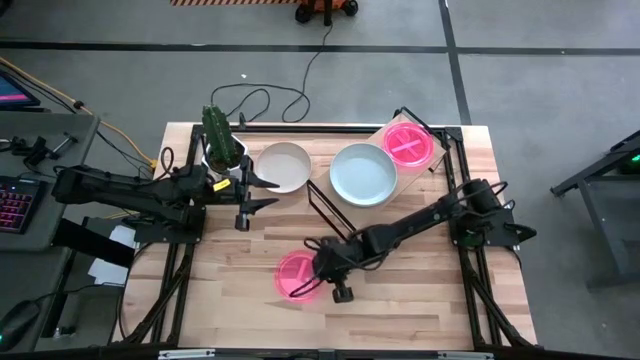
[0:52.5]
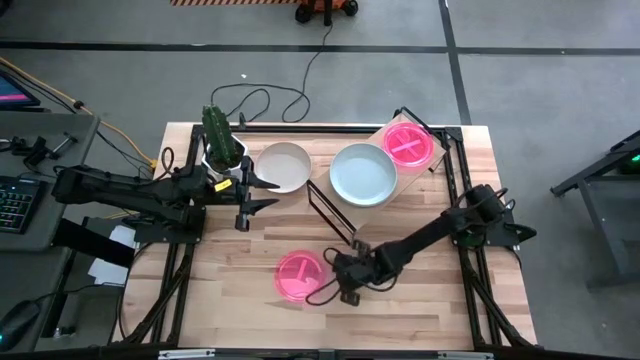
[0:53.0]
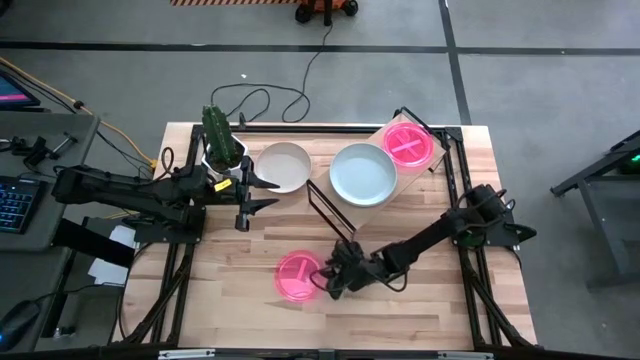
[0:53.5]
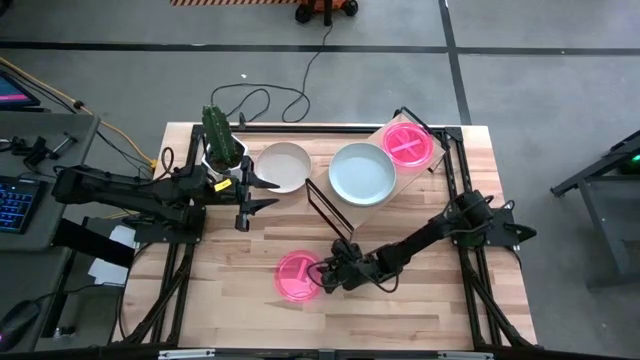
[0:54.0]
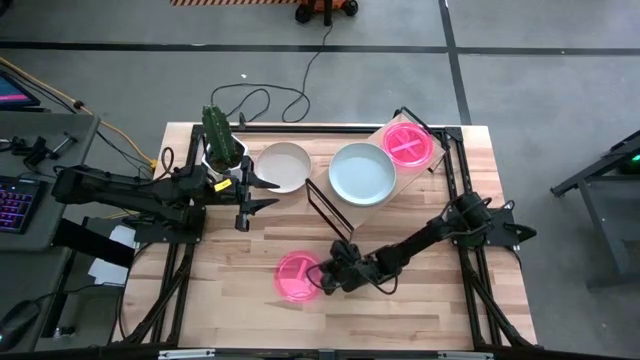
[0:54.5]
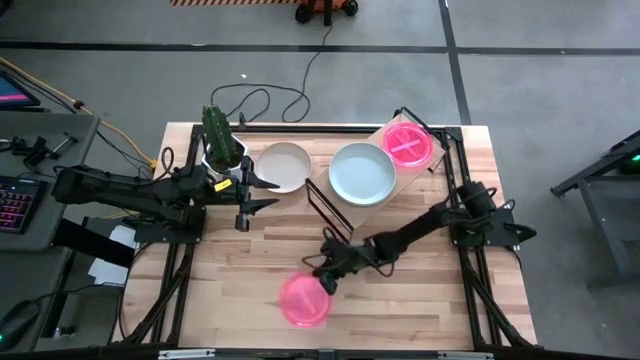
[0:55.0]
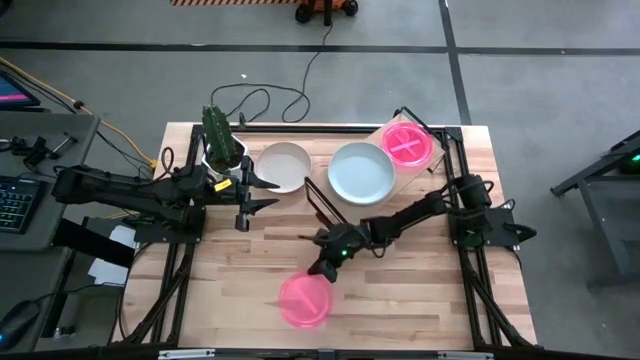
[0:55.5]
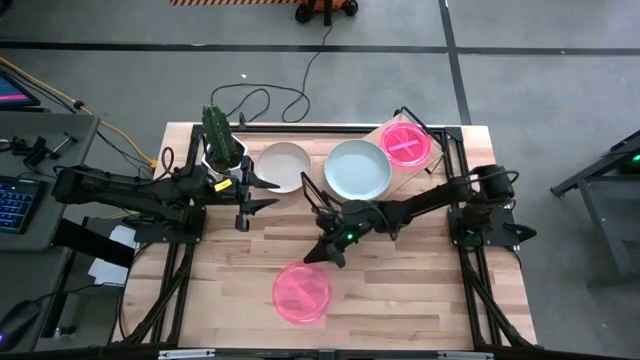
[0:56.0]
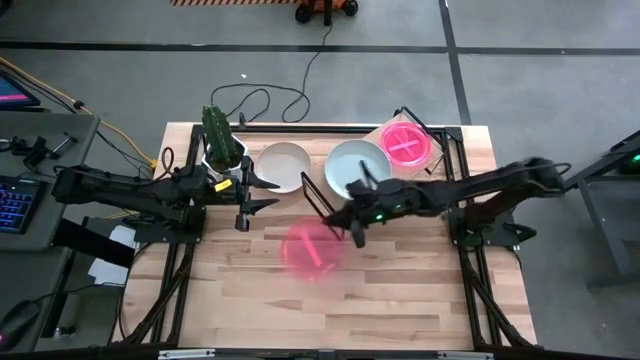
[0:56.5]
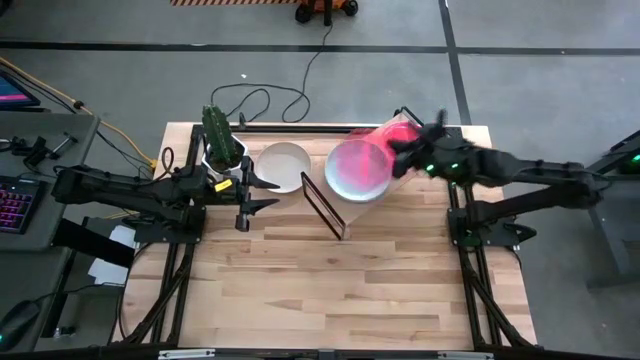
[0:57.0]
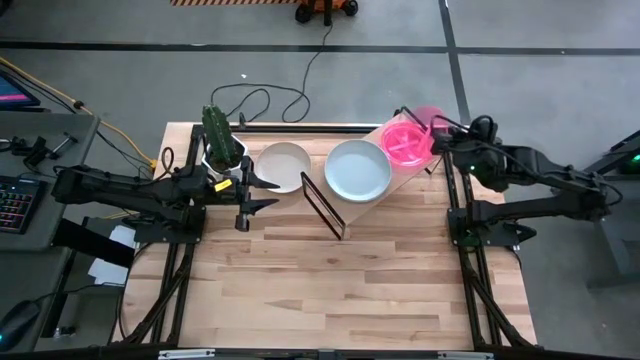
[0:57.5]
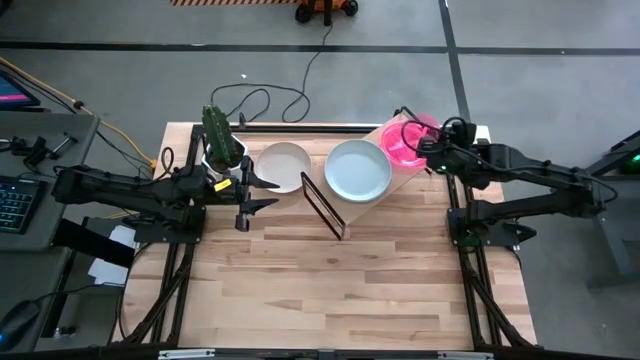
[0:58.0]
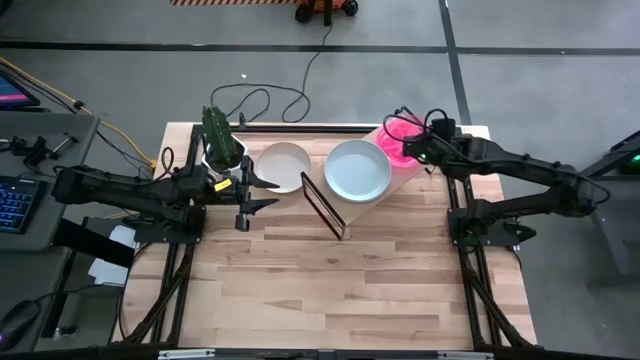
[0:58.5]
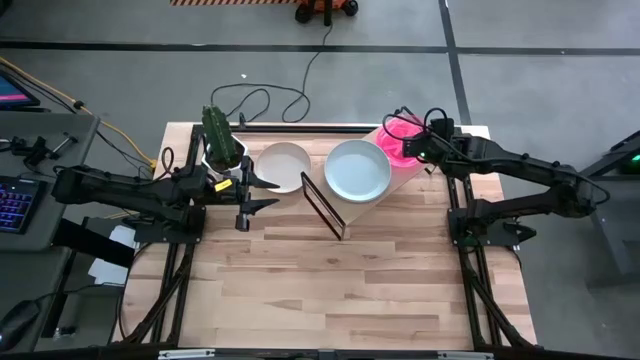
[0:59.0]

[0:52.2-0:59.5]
Task: Place and stack plates onto a shelf
Stack the pink plate on top of the pink plate on the shelf

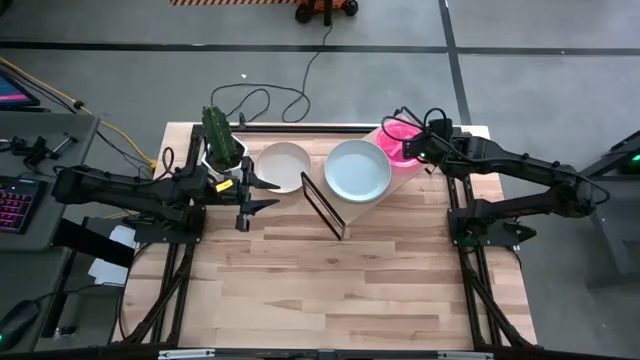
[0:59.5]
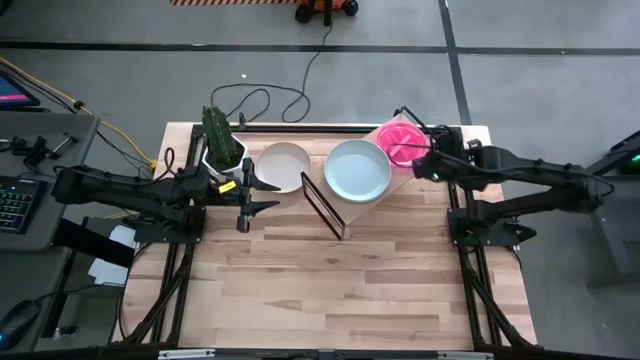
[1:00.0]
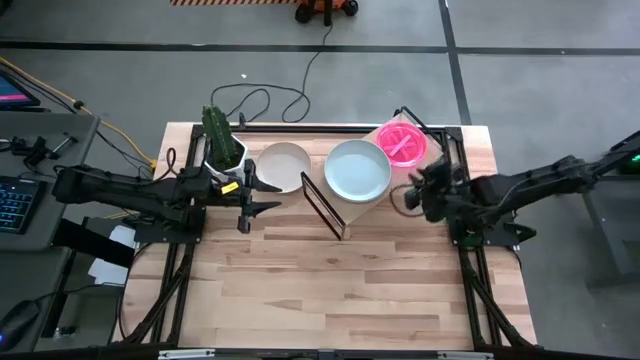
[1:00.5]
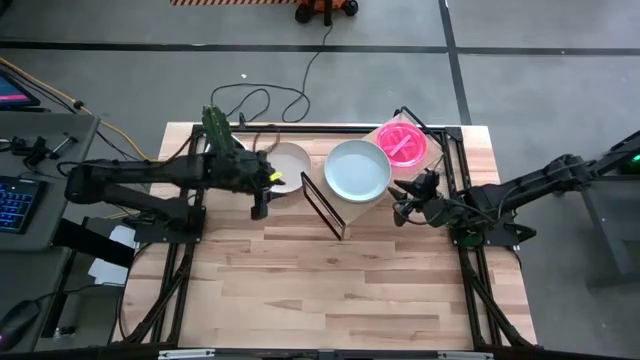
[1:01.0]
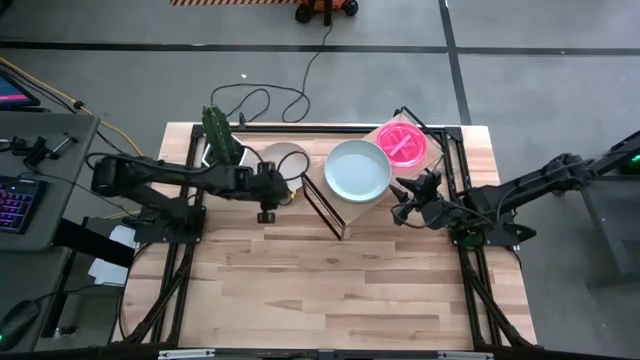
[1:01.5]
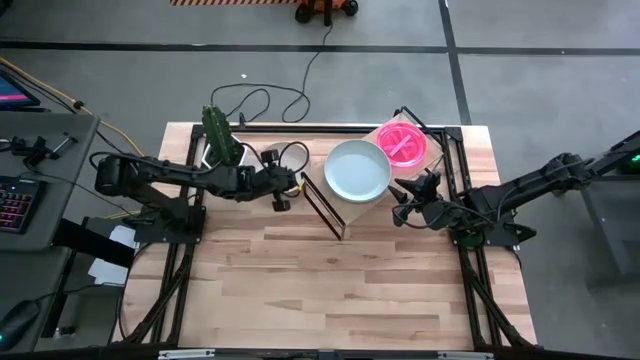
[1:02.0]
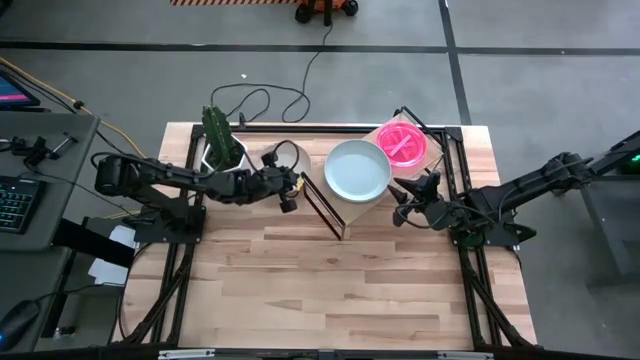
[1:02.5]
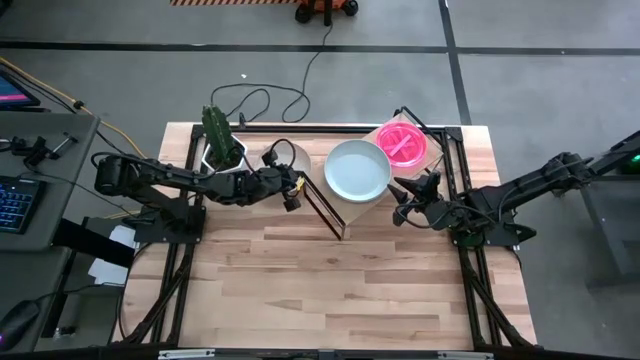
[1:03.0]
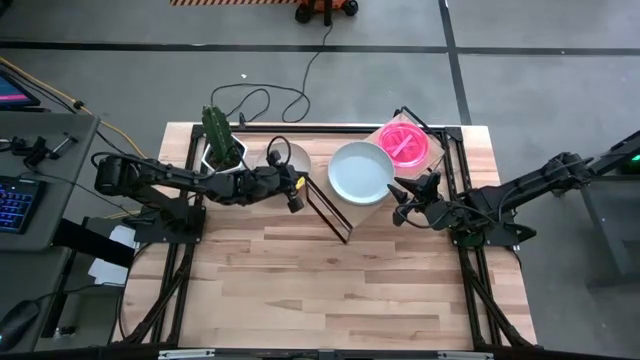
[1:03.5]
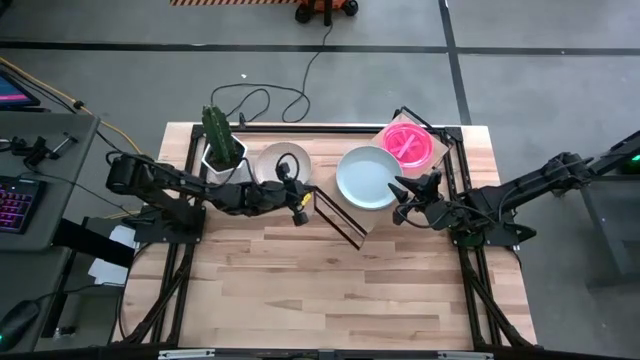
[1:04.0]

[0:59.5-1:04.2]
Adjust the shelf

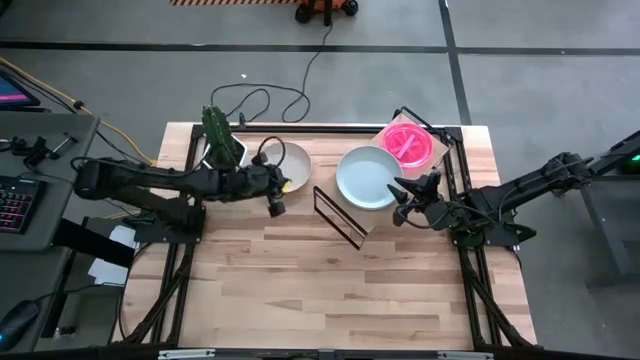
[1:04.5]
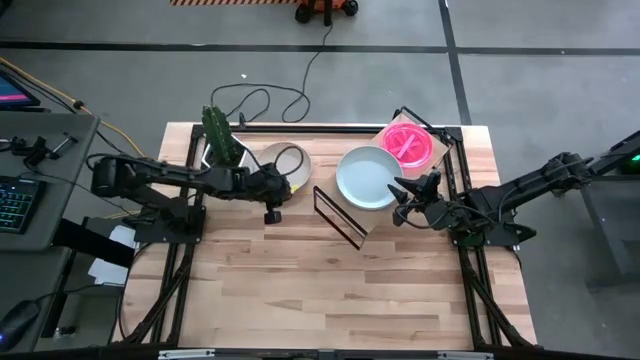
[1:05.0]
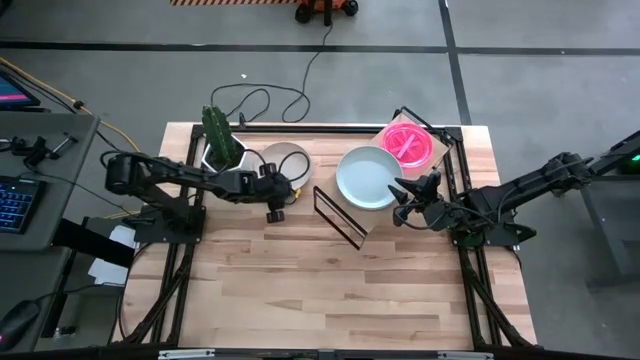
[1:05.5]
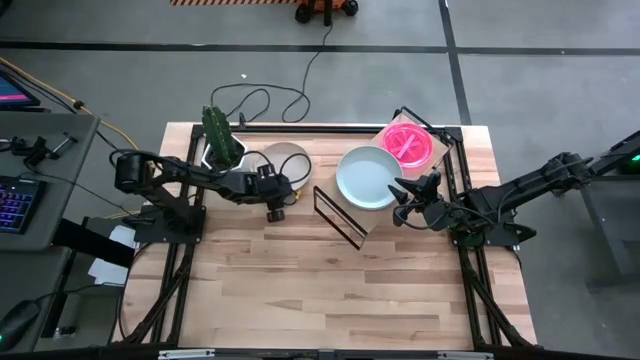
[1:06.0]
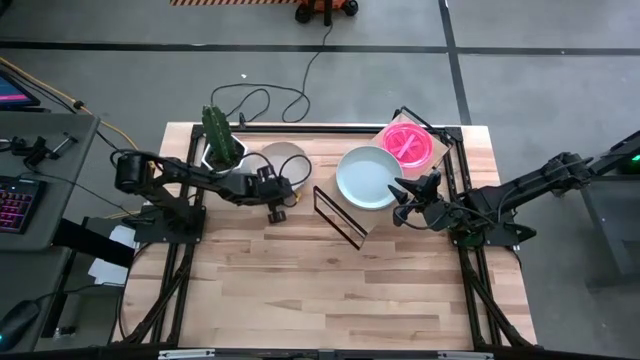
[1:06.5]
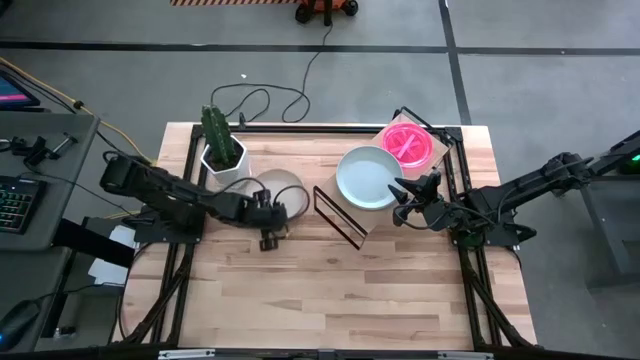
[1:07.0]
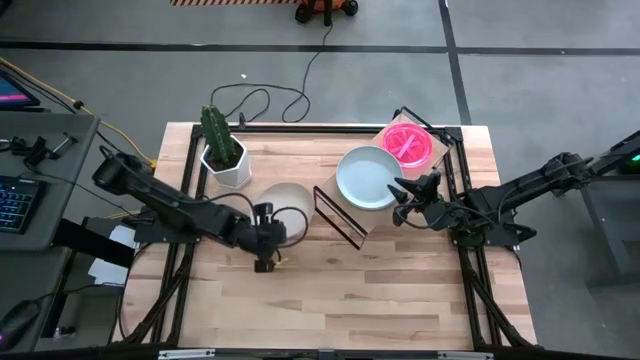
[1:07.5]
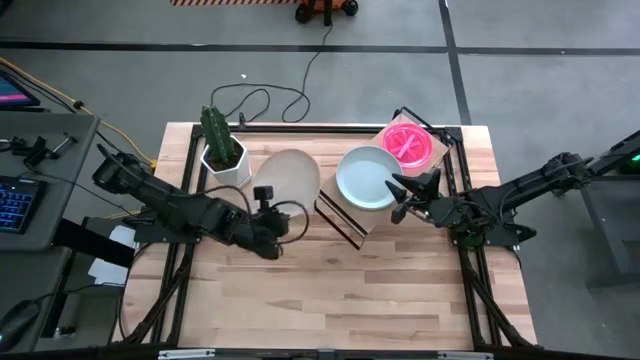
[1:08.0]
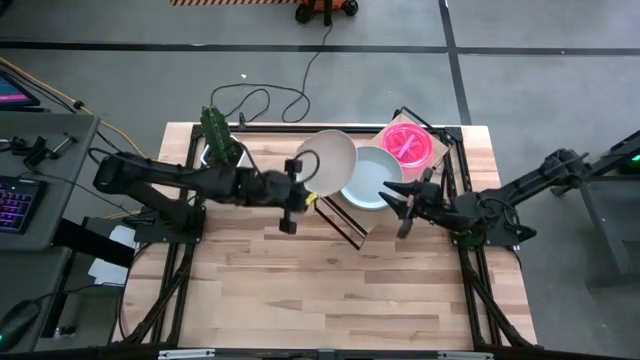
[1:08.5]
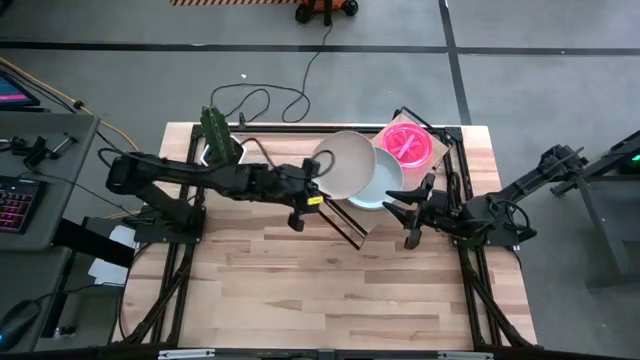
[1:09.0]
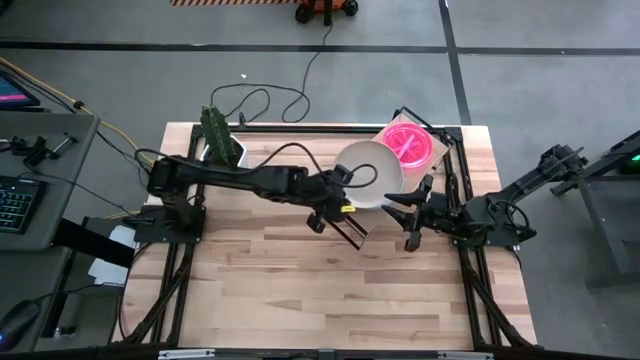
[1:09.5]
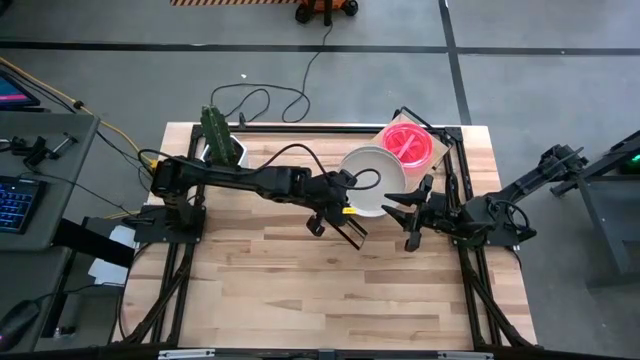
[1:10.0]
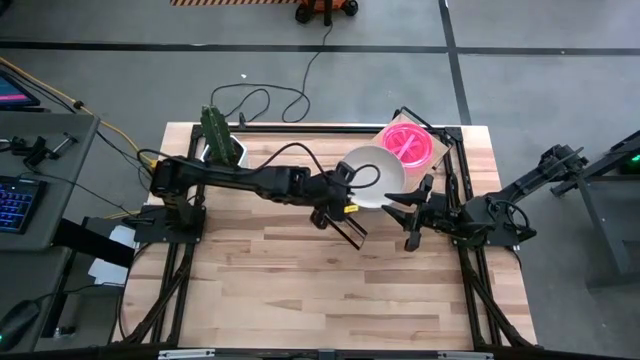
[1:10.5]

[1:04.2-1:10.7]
Stack the white plate on top of the blue plate on the shelf

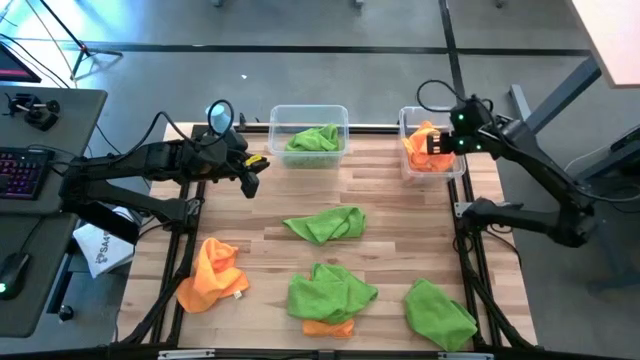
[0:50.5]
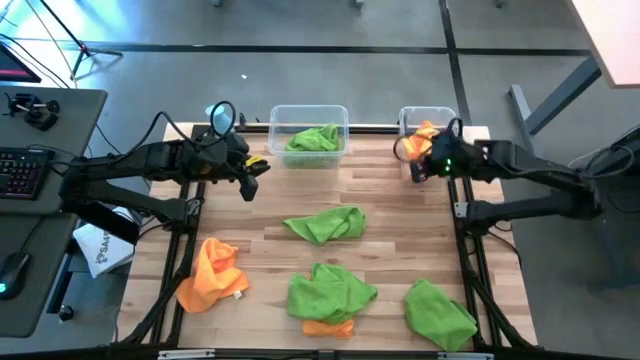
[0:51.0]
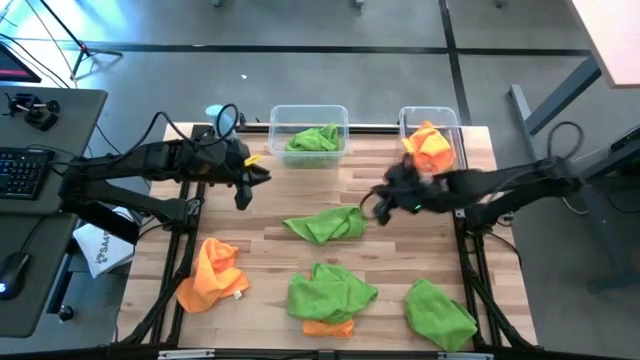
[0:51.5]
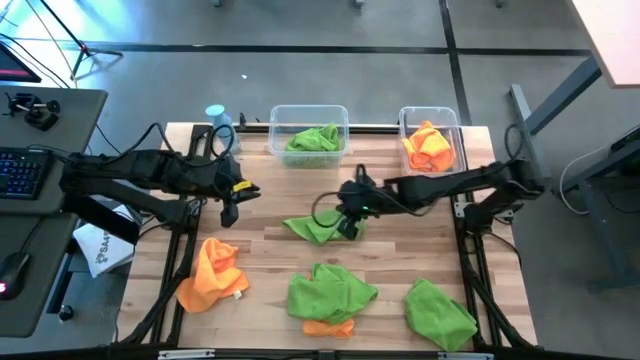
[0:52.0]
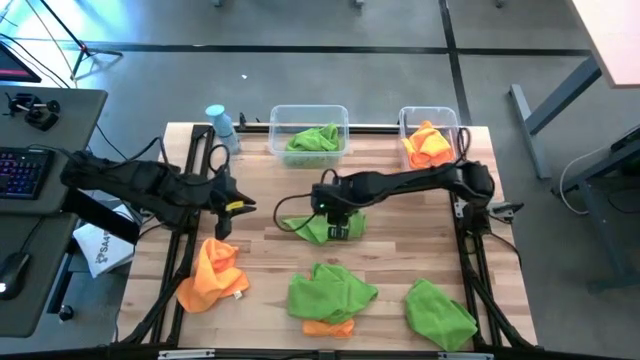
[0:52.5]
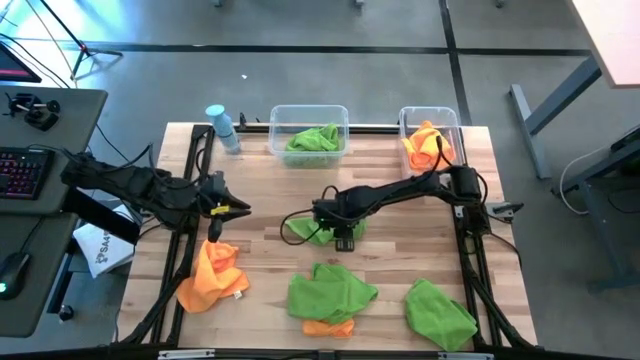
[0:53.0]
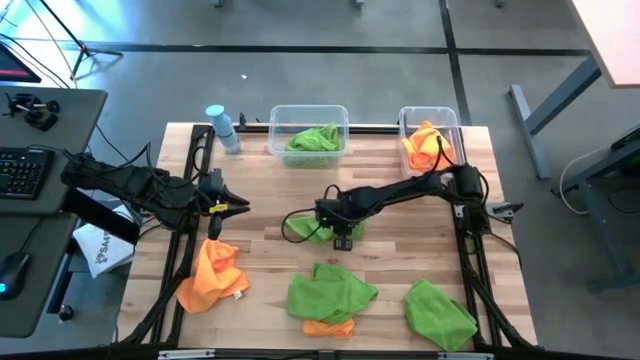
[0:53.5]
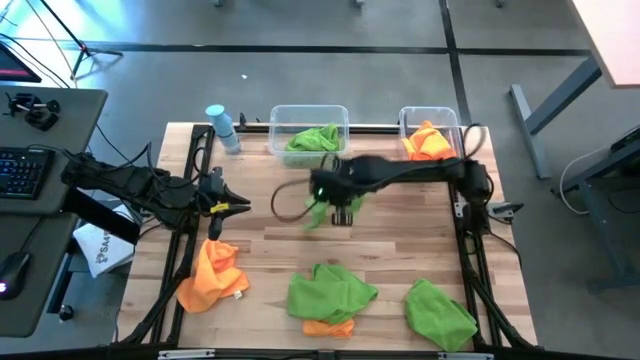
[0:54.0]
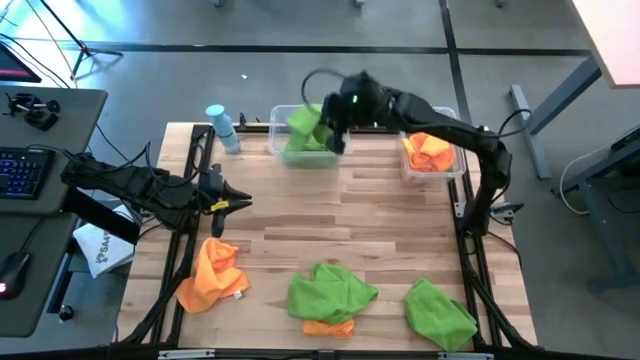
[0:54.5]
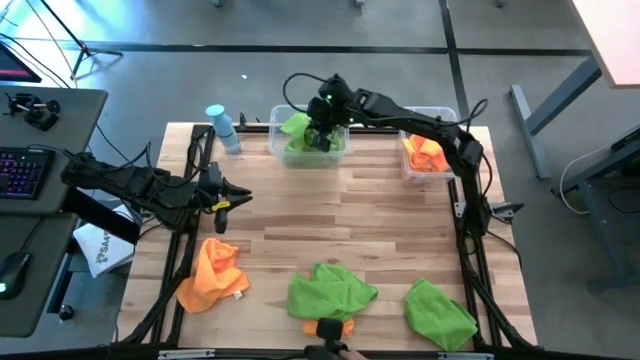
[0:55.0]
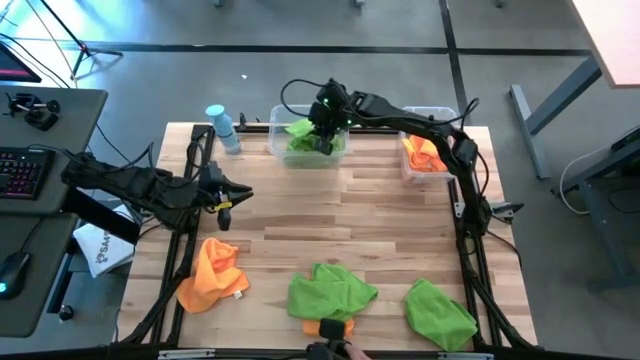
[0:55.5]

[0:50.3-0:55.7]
Task: Sort microfiber towel by color & place in baskets
Put the green towel into the left transparent bin
